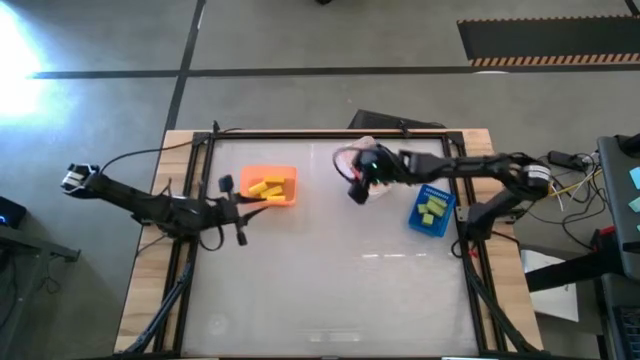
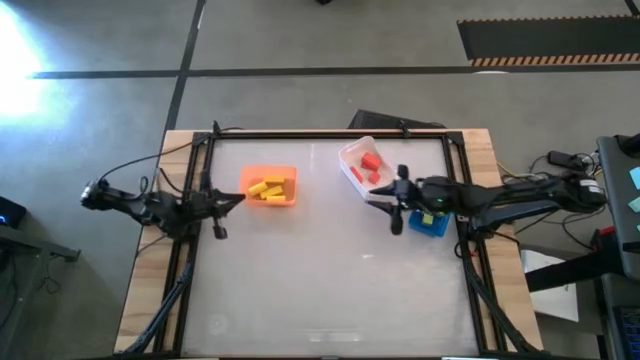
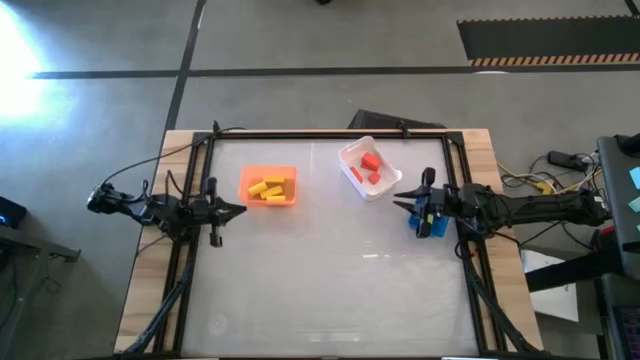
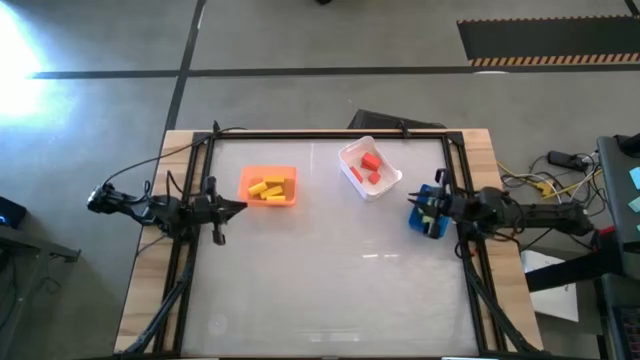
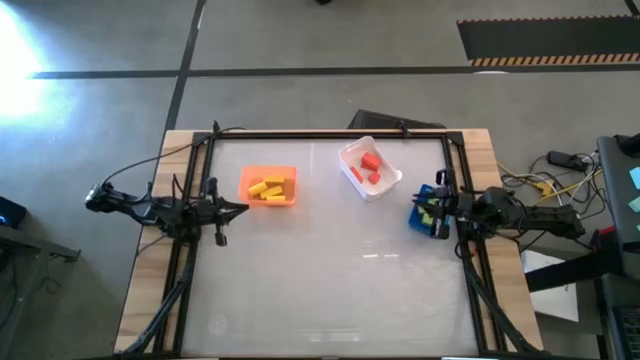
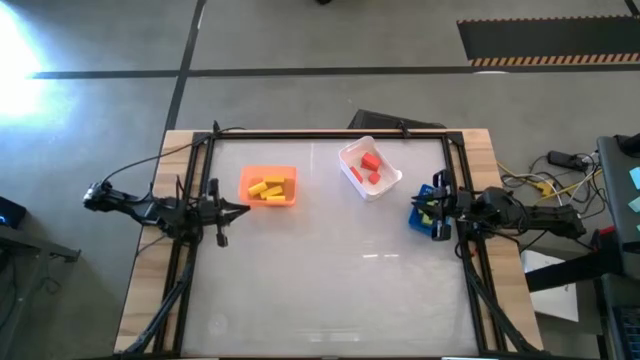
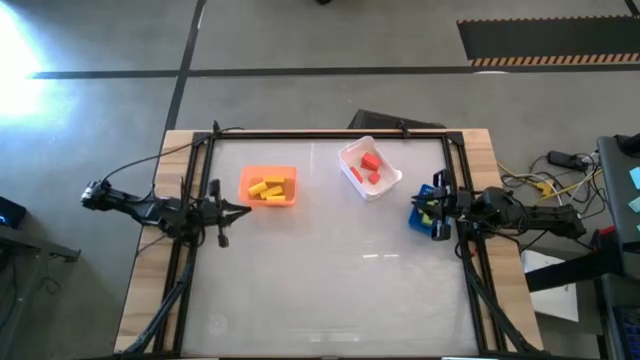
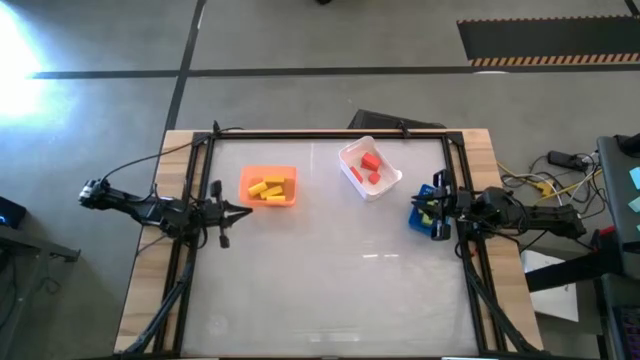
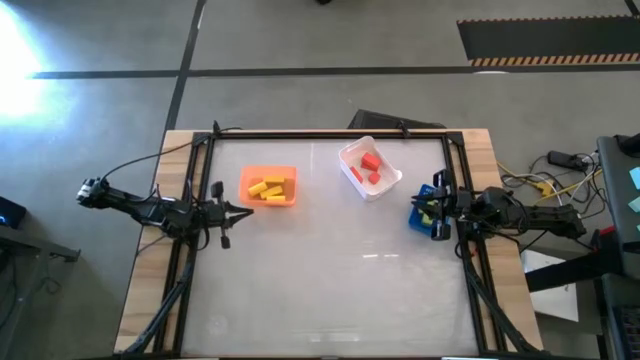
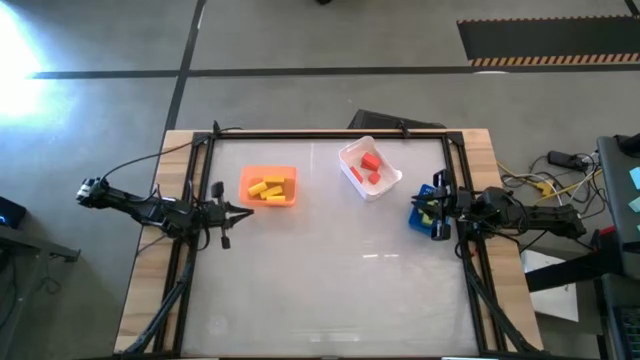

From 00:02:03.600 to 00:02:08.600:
Task: Sort & place blocks by color
Return to Home Position

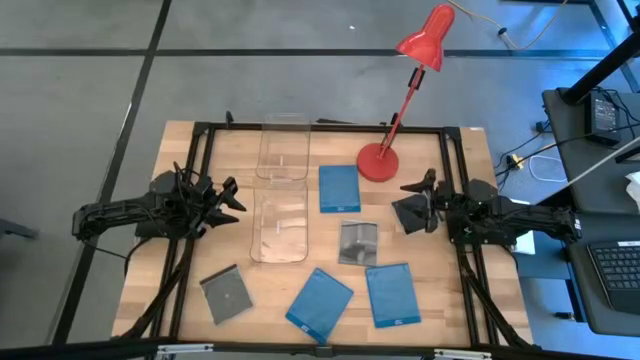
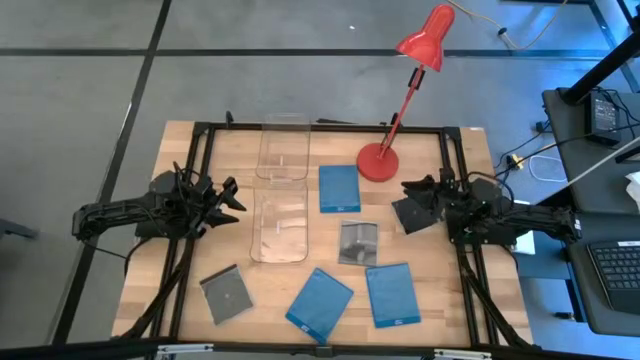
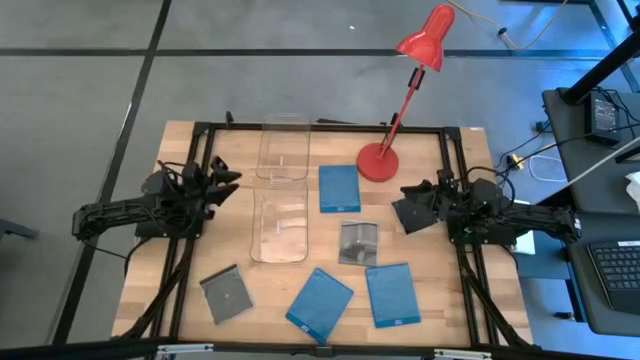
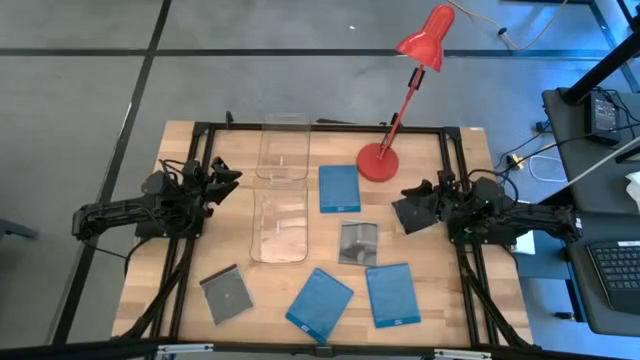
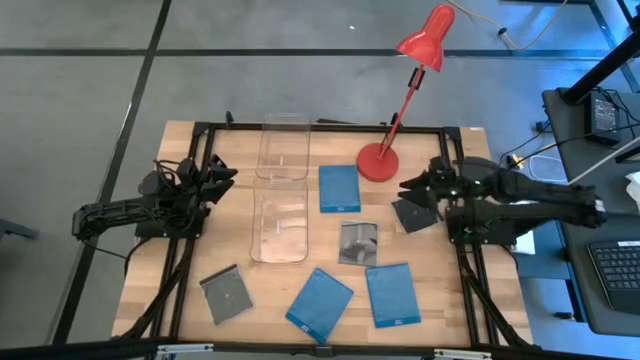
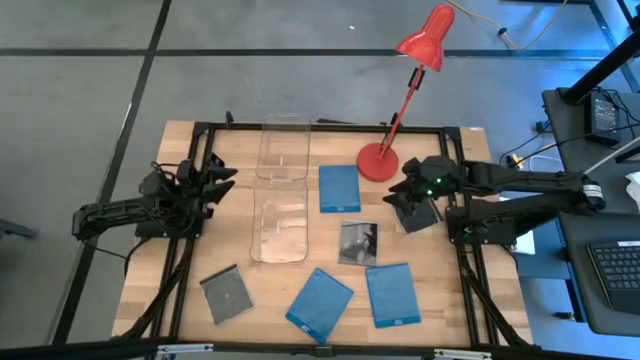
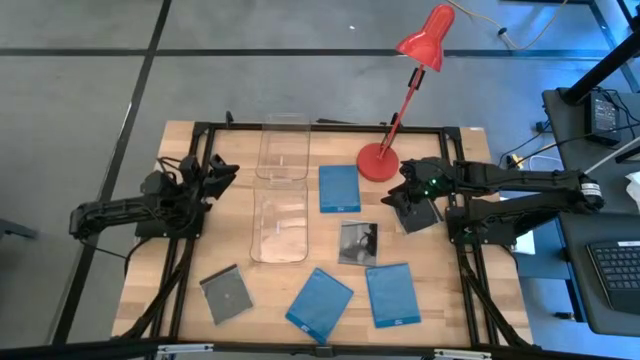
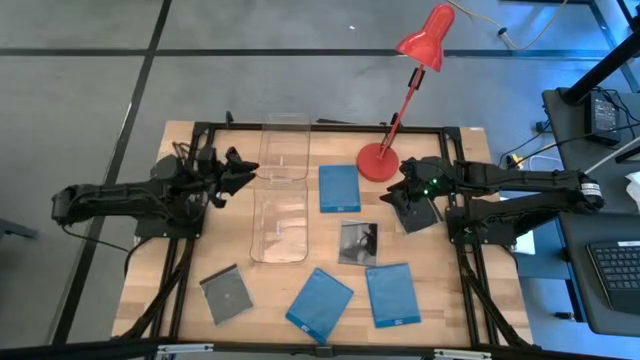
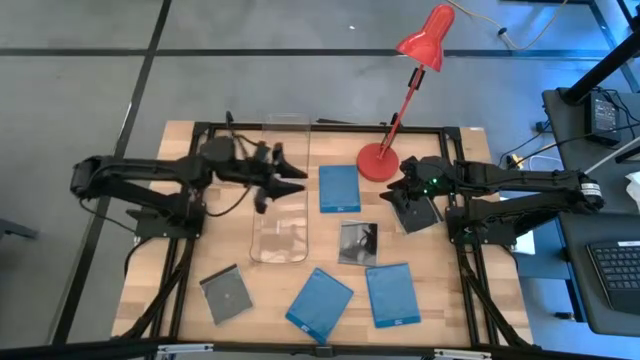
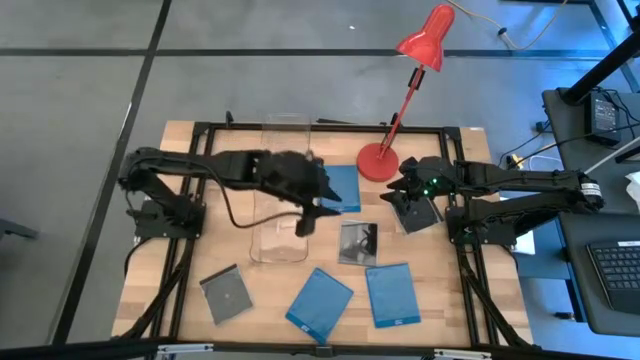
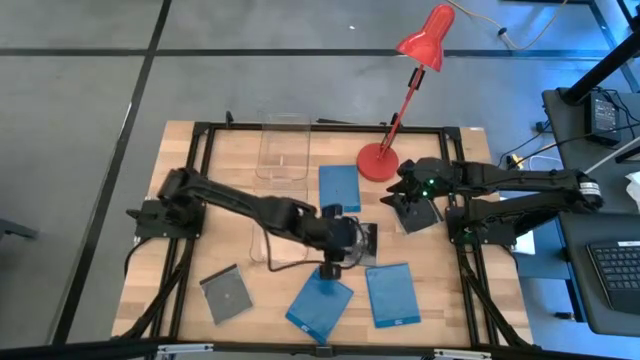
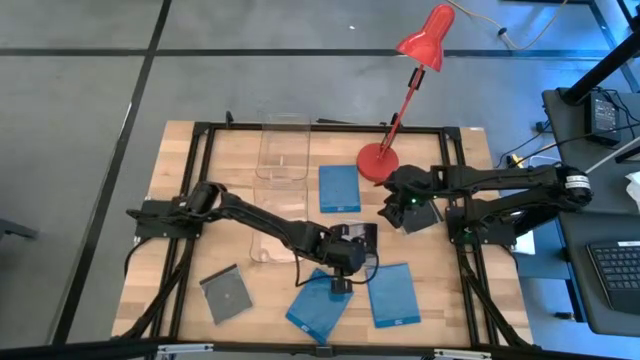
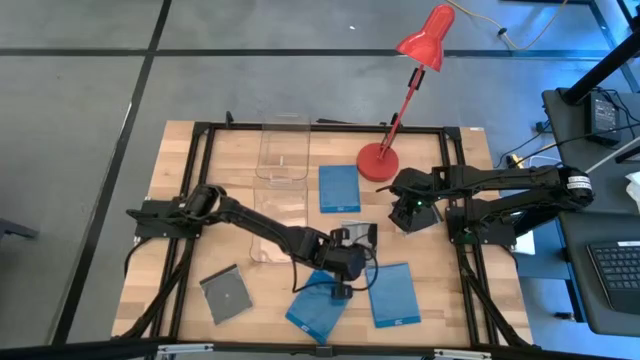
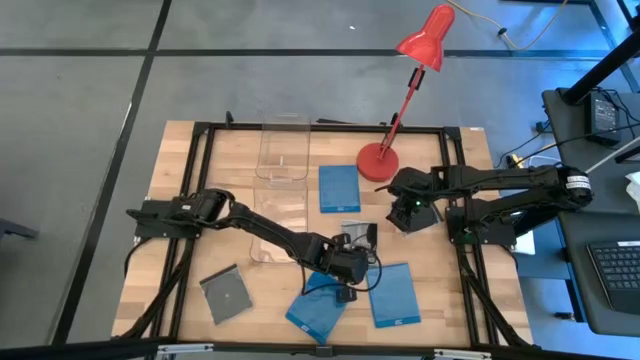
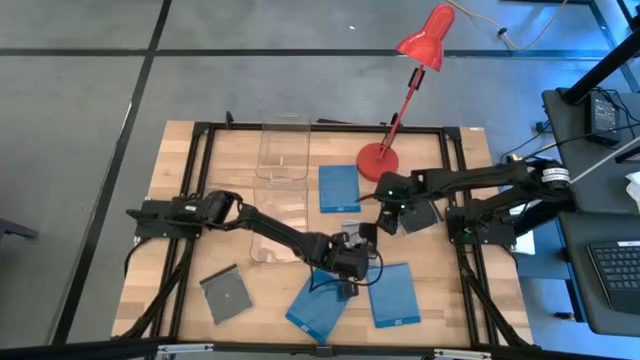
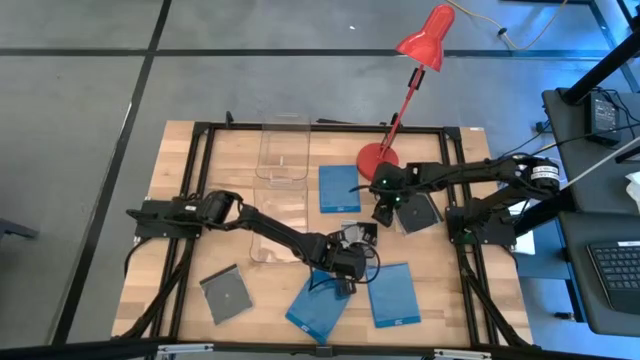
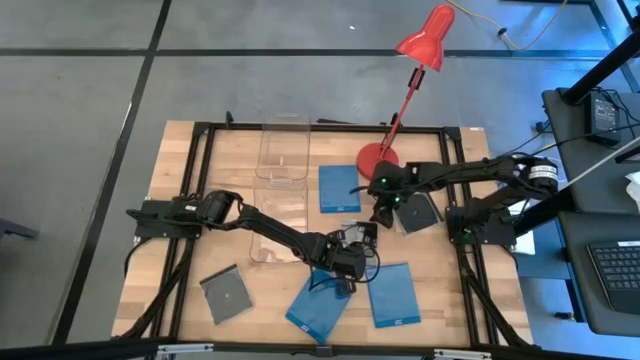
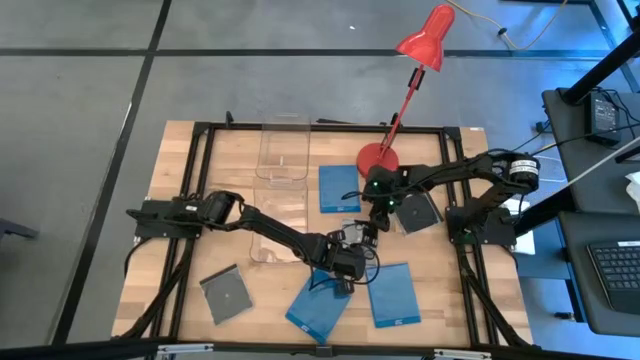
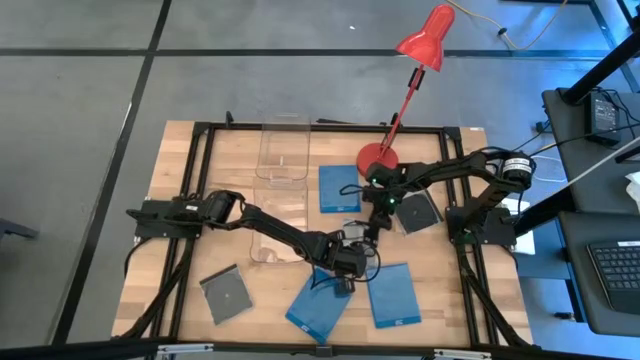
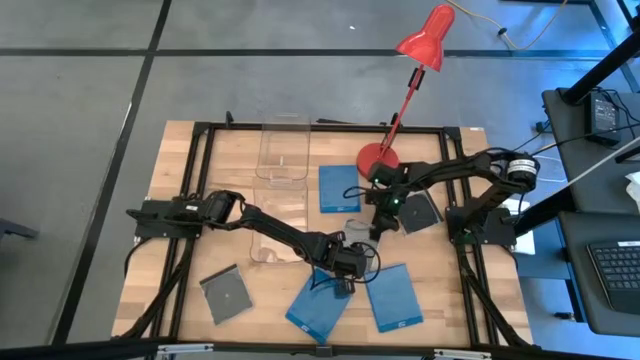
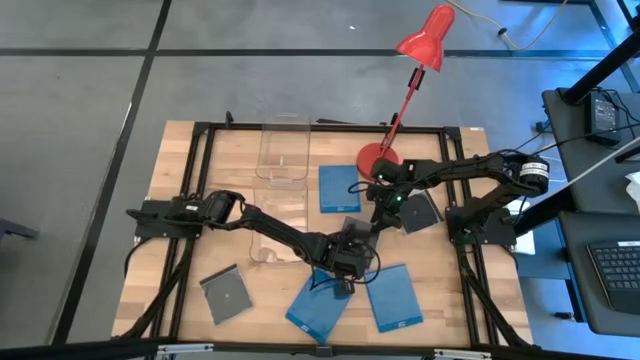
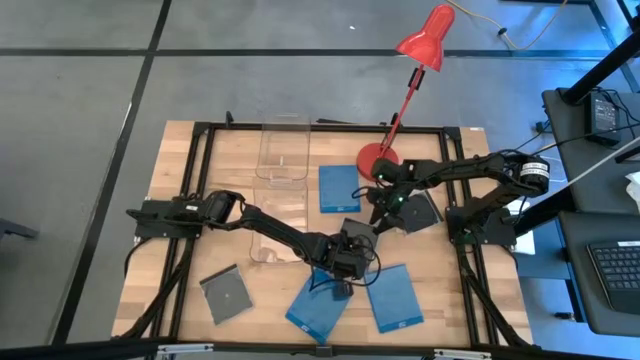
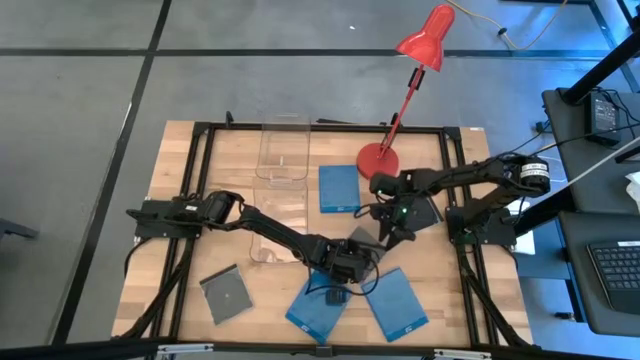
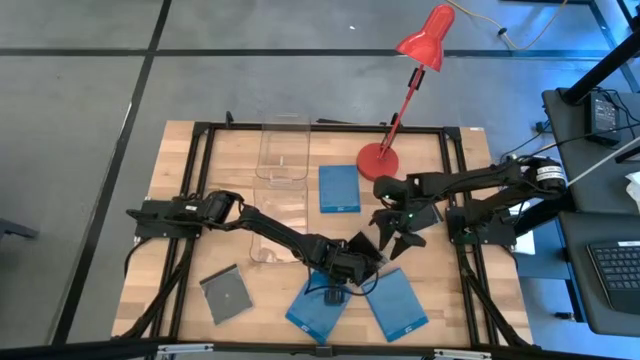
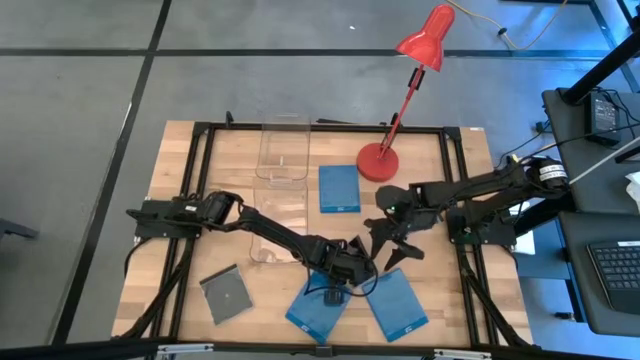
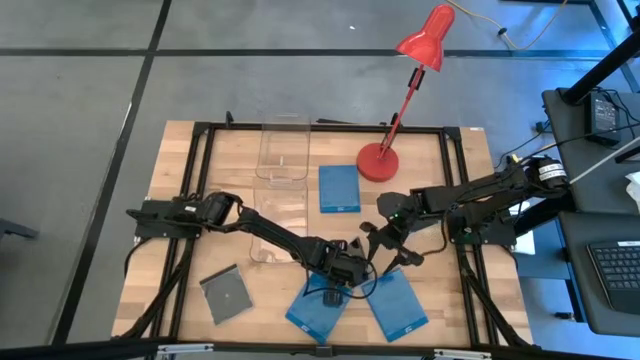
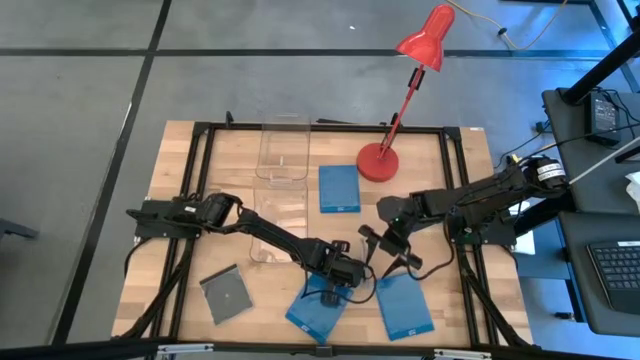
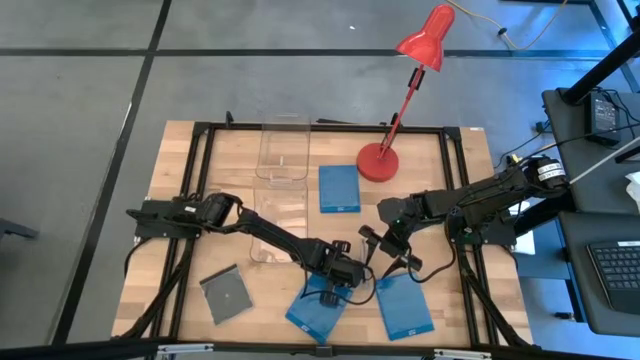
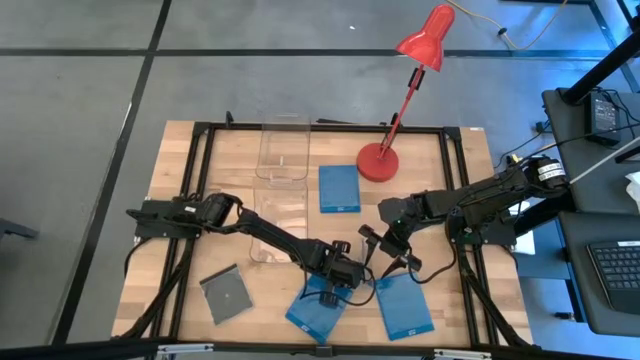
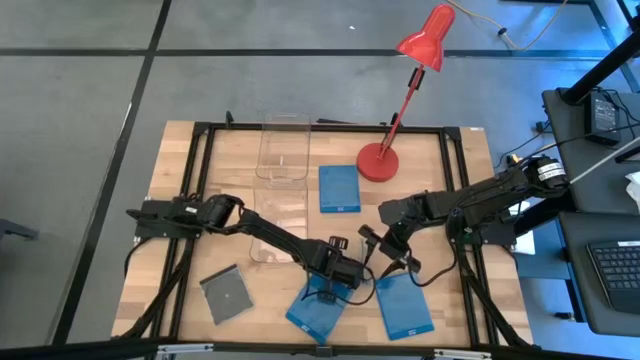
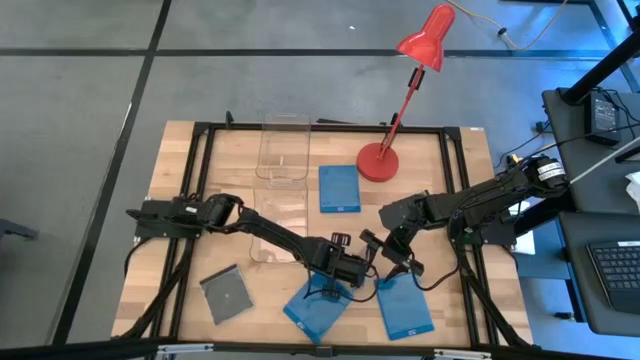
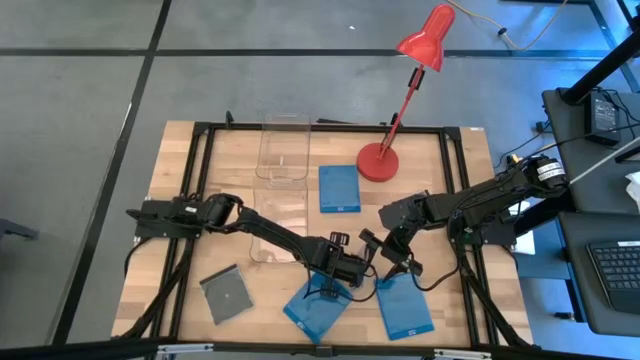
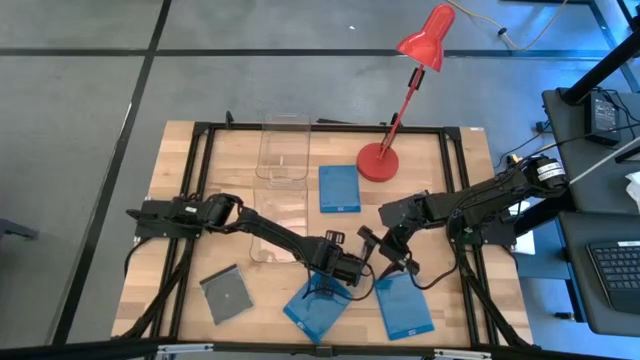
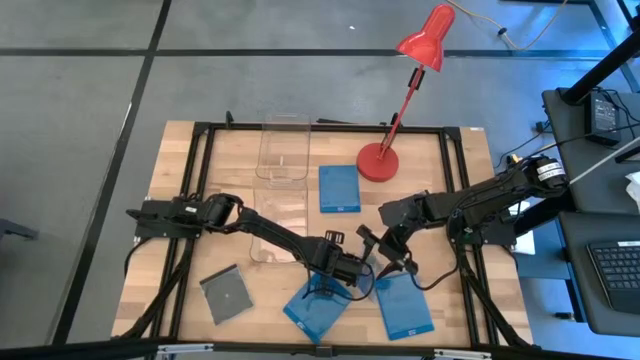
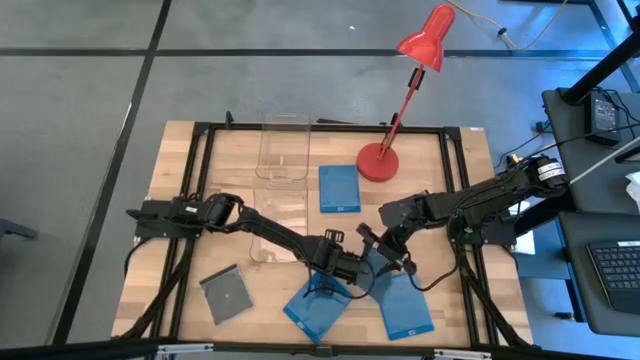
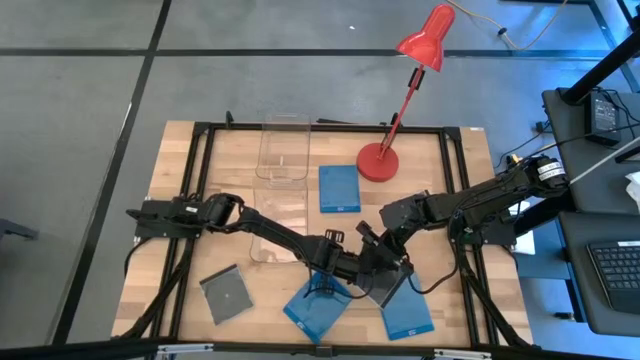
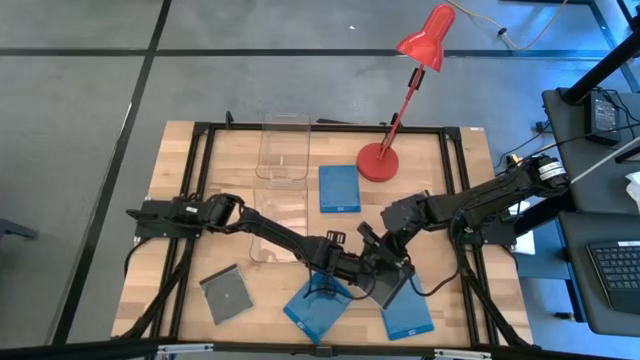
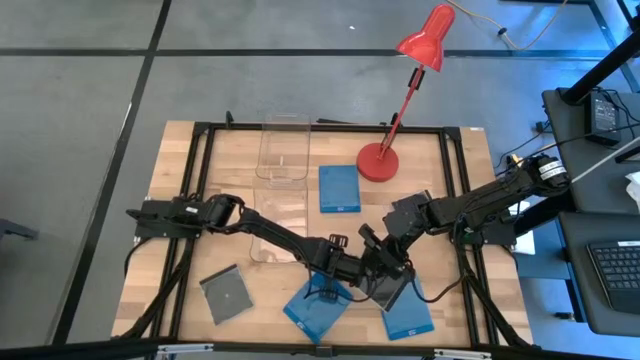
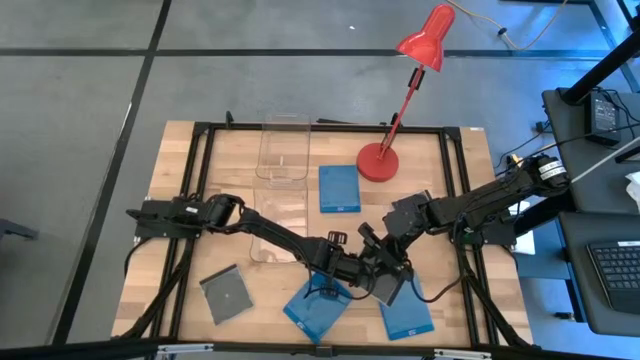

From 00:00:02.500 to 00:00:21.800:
Task: Pick & place jewel cases by type
Put the middle black cd case into the bottom transparent bin
